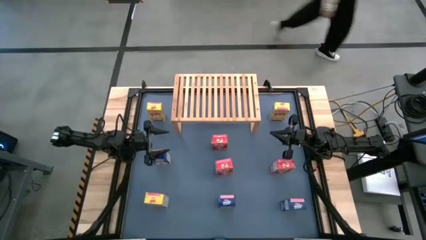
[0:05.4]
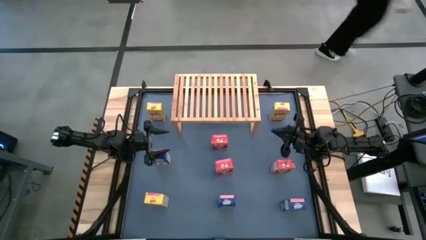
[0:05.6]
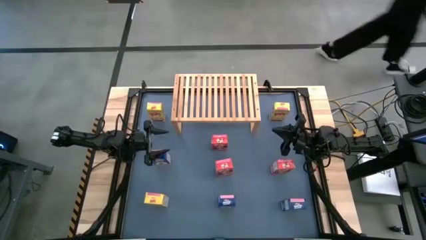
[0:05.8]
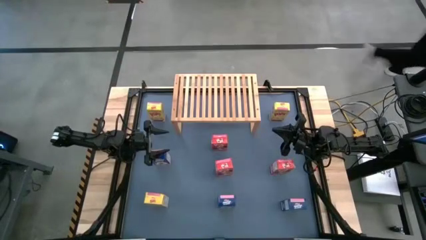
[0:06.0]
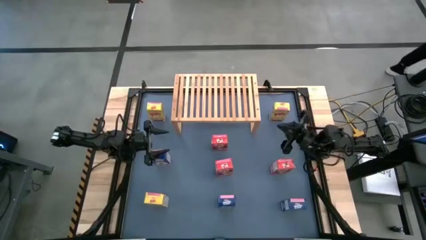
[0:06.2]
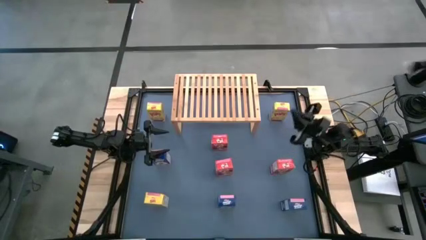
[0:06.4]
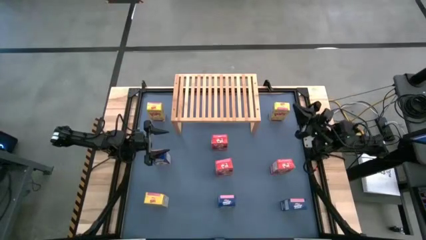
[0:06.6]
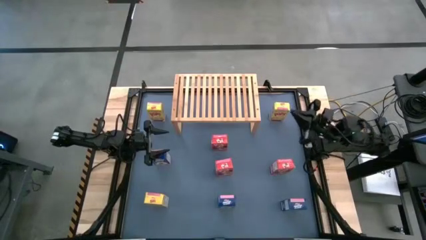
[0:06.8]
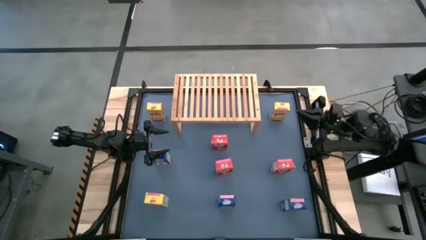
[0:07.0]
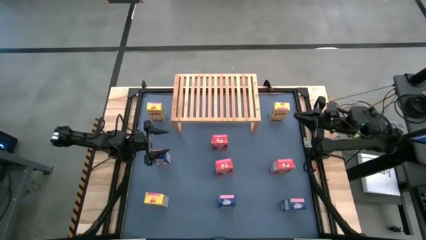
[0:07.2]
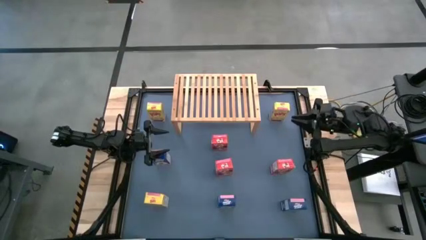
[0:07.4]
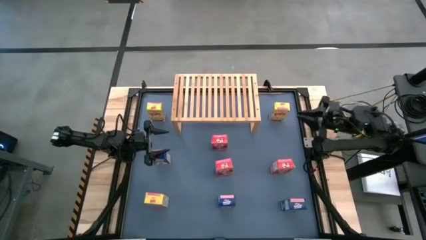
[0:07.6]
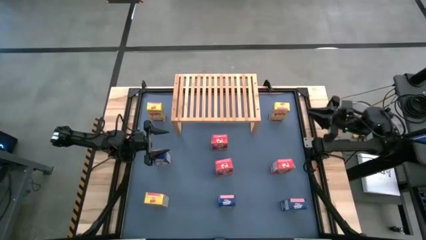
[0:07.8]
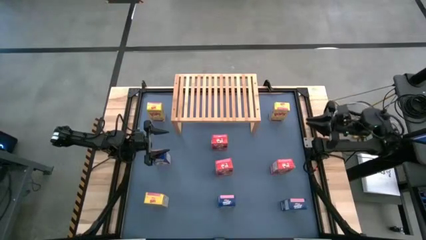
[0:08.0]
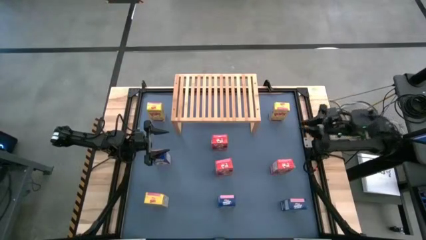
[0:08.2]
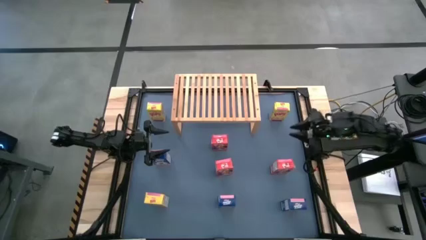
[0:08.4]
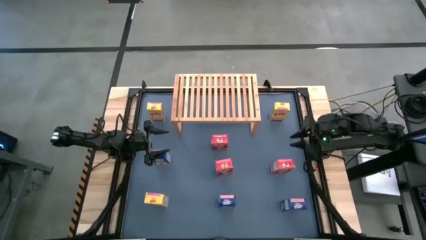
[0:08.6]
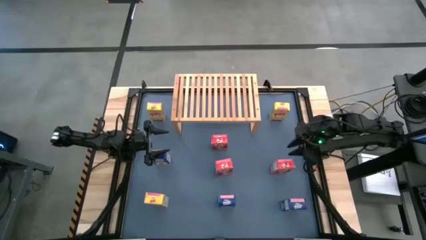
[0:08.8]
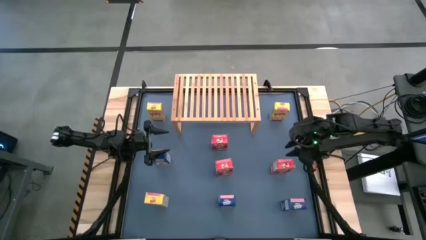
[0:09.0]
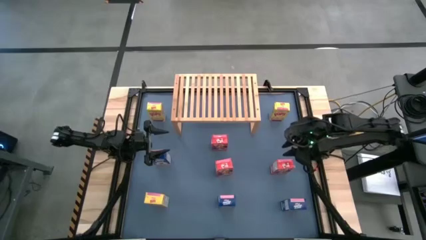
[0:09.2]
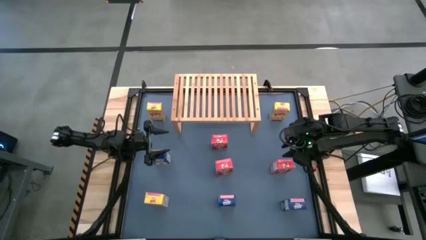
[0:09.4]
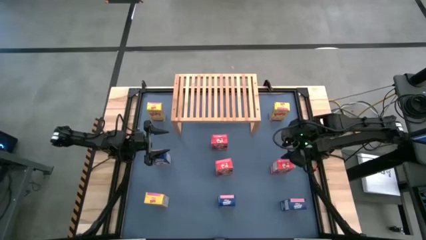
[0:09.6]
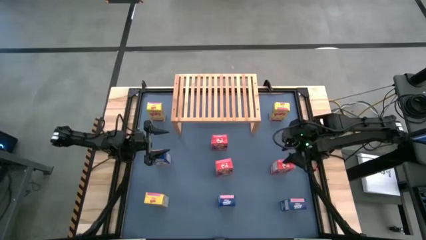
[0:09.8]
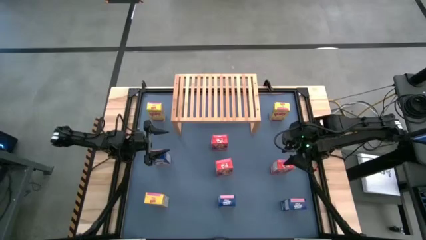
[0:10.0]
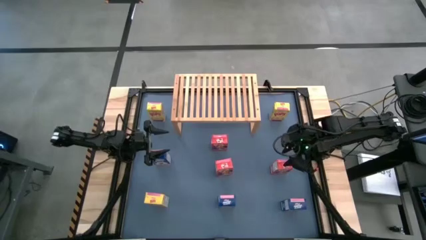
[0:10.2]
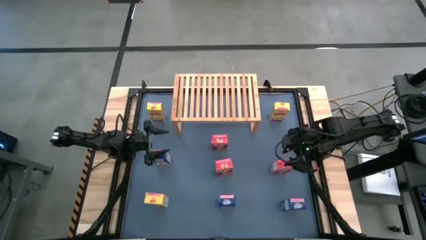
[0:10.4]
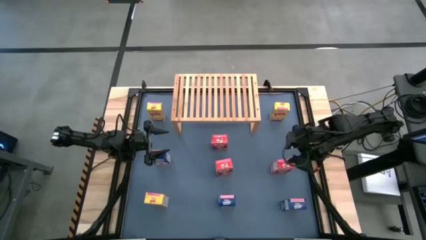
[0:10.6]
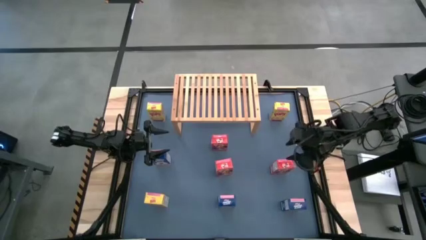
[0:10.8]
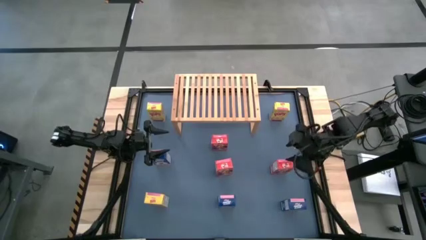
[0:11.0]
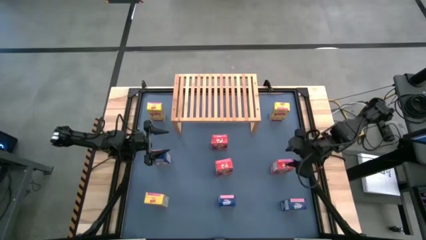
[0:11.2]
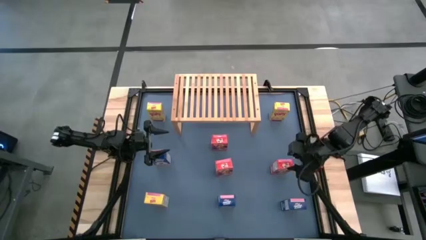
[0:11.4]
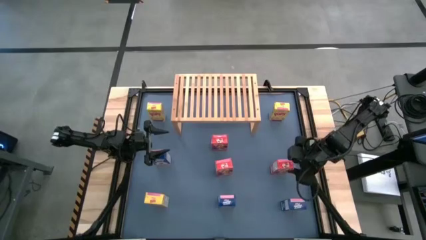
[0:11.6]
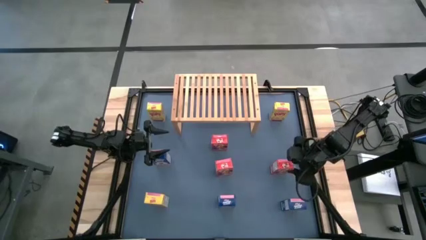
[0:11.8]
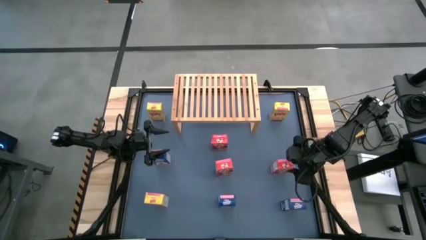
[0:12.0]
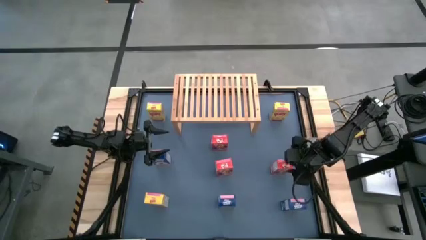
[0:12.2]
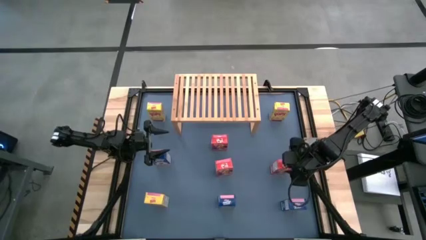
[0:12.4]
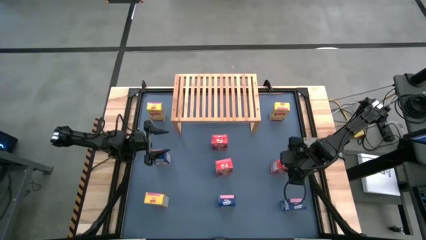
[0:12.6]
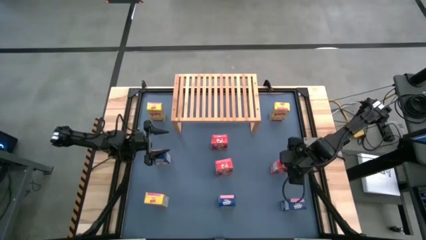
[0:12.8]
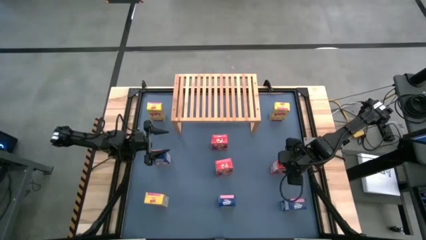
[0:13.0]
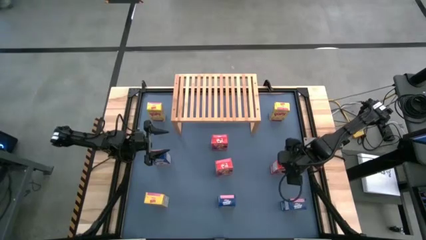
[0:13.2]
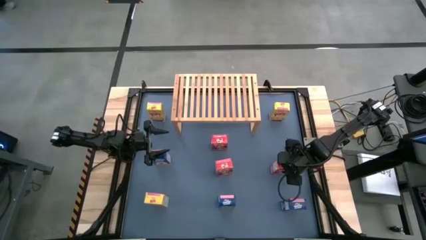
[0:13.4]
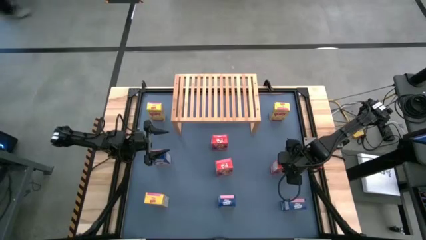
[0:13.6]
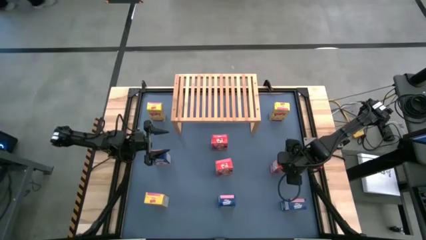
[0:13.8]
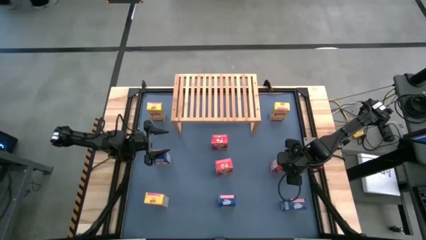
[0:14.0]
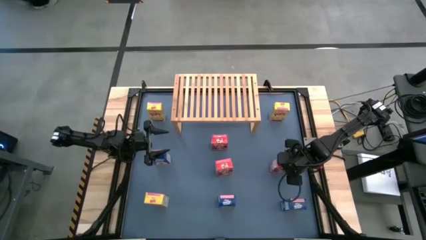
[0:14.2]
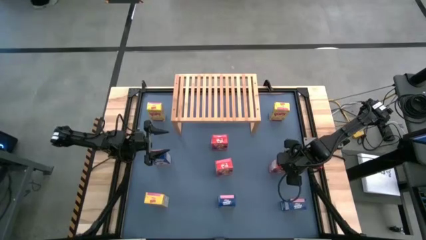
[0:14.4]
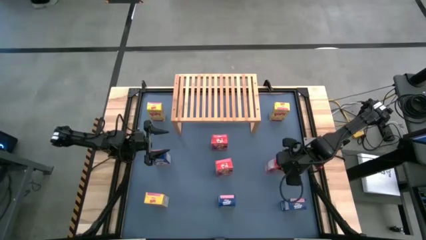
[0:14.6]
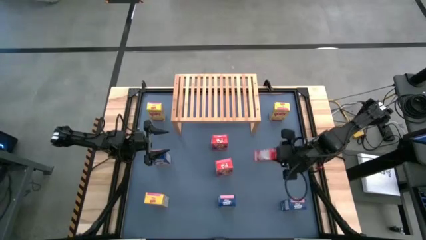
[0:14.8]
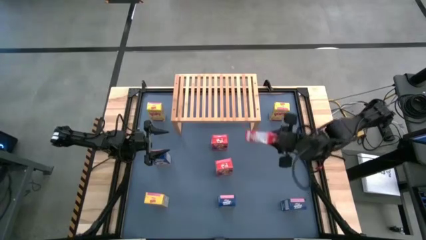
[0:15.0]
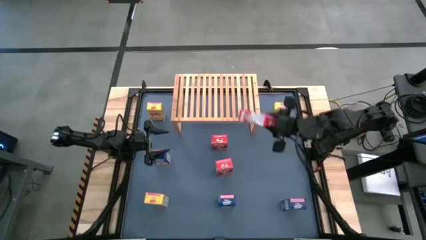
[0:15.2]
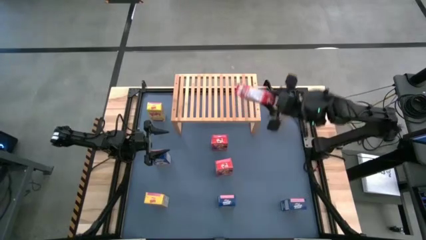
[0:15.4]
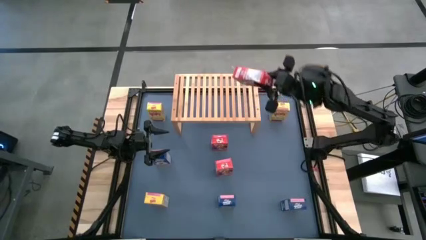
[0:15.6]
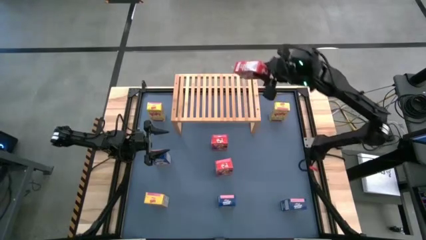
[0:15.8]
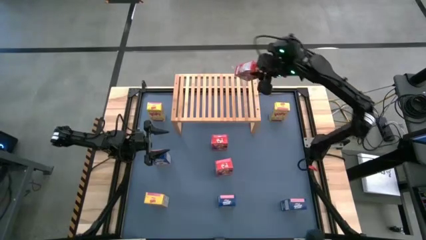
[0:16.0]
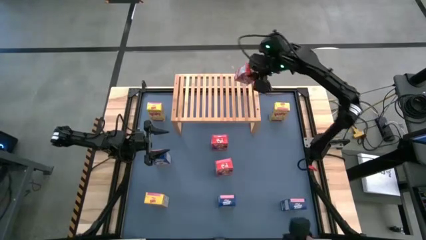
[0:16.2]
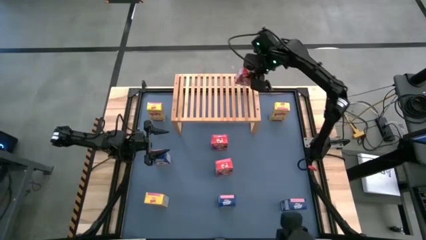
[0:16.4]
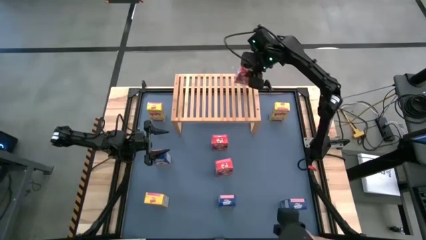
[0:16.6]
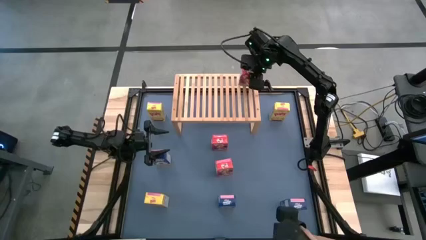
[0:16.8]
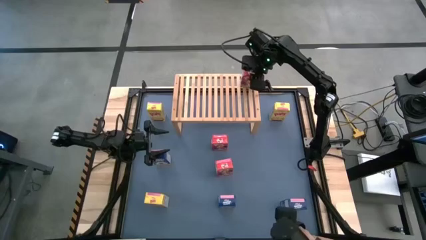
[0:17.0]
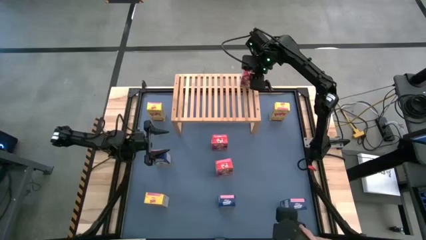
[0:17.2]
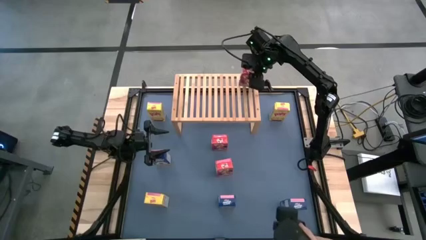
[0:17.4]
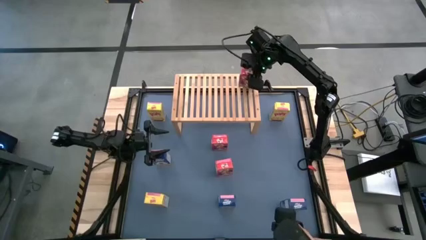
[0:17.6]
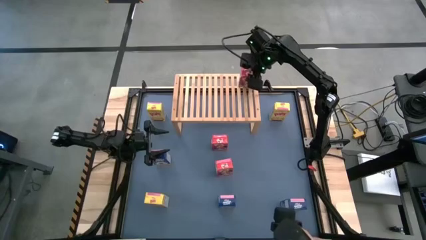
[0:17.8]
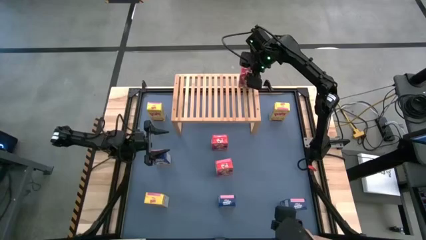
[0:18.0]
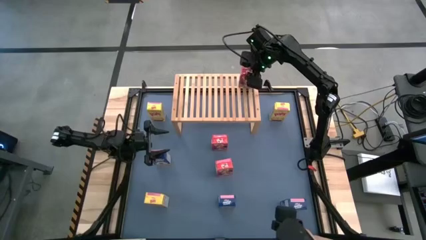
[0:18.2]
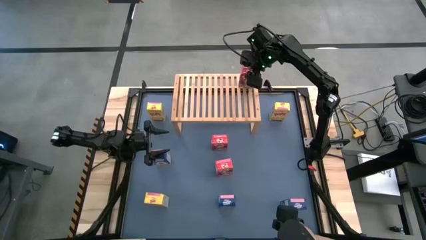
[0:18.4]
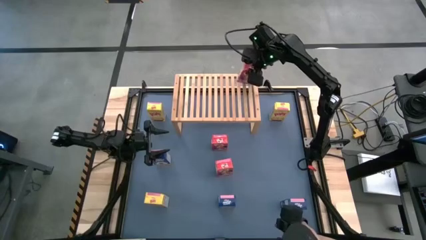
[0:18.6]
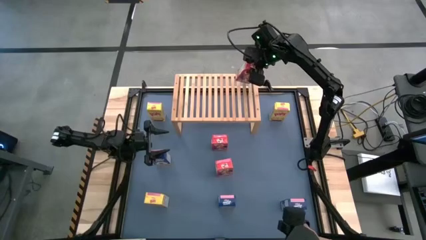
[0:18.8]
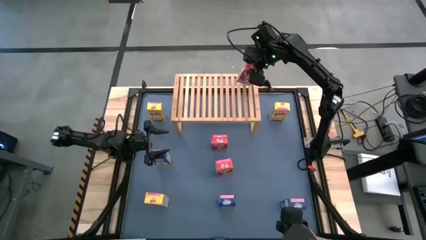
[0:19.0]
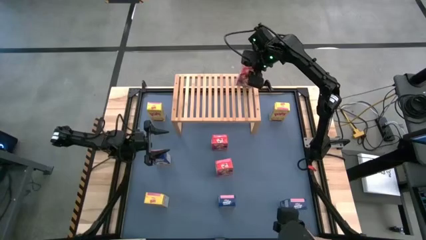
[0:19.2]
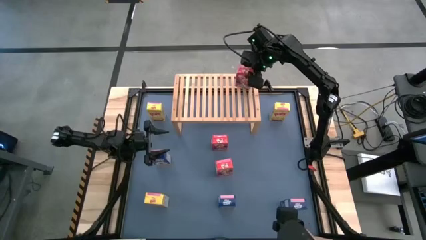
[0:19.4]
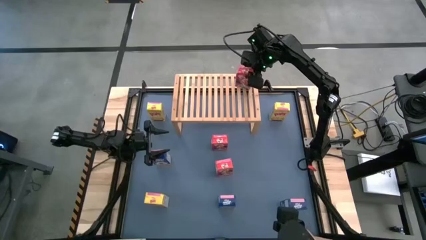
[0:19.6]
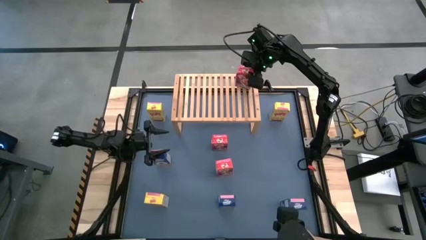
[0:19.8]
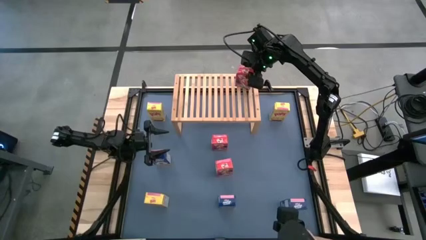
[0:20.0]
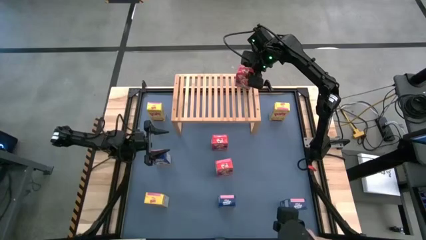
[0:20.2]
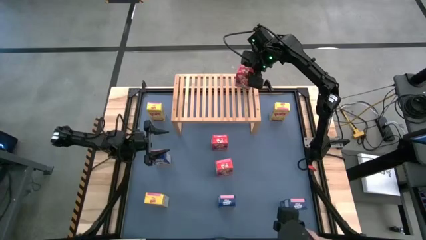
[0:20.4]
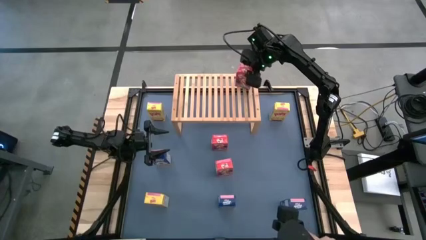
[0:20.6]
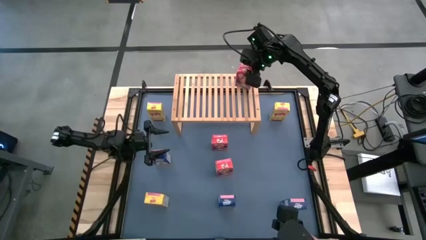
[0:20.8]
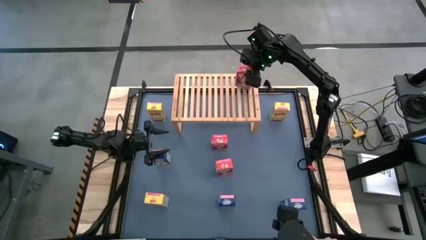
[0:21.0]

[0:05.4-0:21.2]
Task: Stack cereal on shelf
Put the bottom right red cereal box on the shelf
